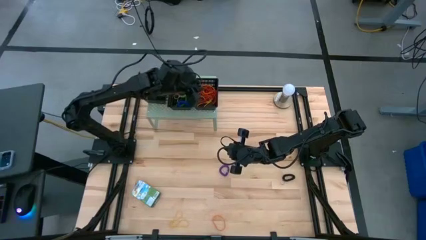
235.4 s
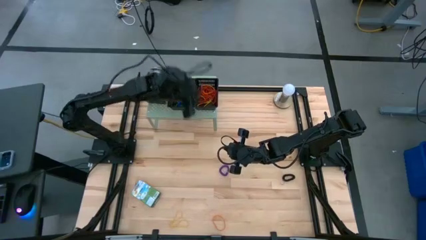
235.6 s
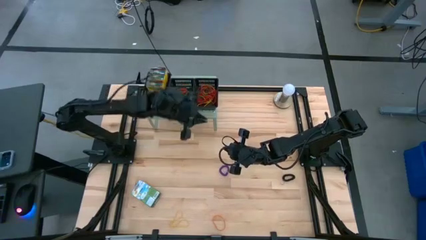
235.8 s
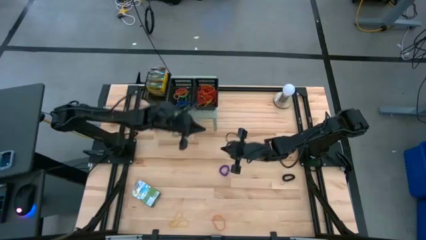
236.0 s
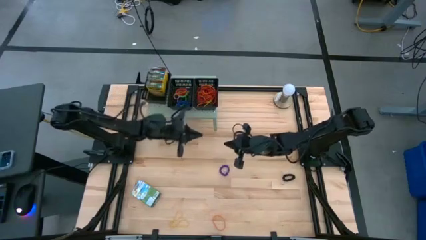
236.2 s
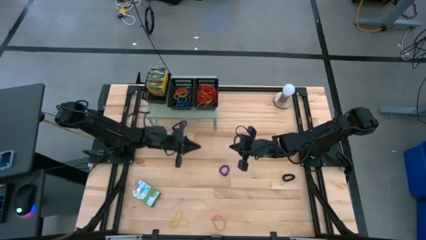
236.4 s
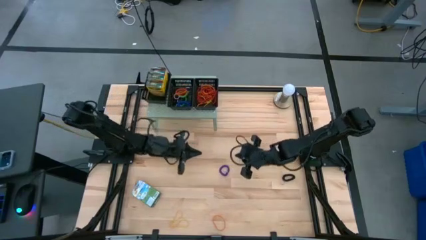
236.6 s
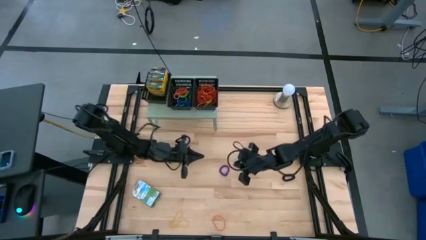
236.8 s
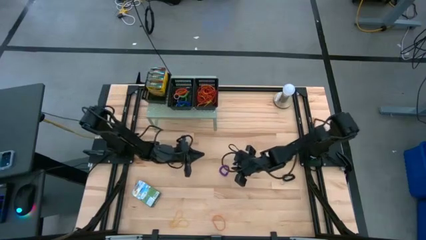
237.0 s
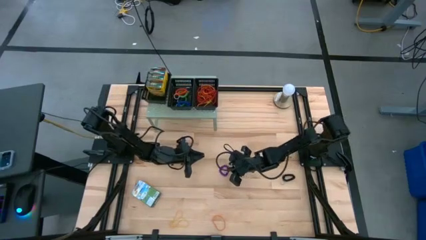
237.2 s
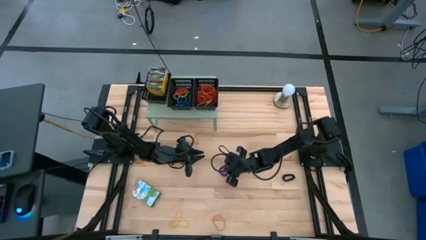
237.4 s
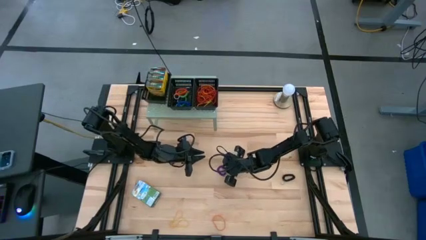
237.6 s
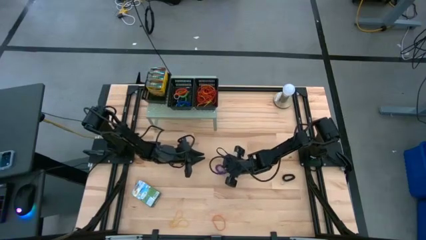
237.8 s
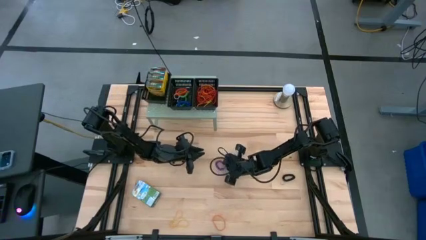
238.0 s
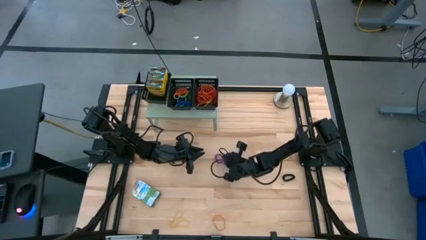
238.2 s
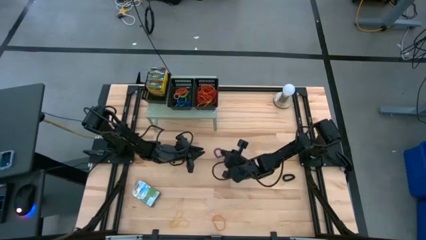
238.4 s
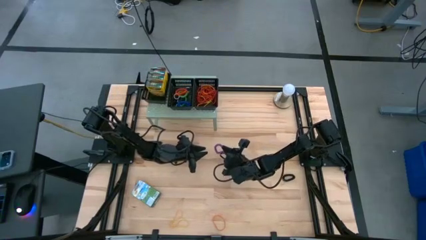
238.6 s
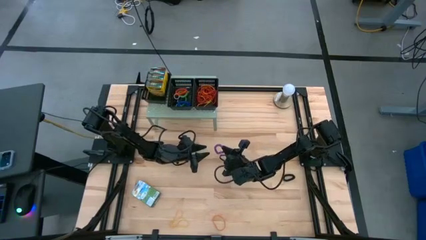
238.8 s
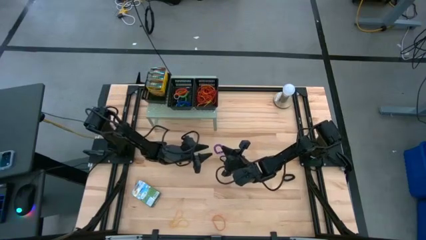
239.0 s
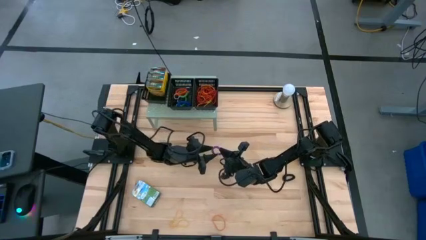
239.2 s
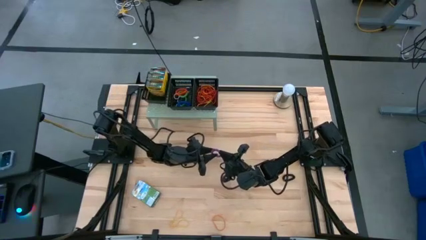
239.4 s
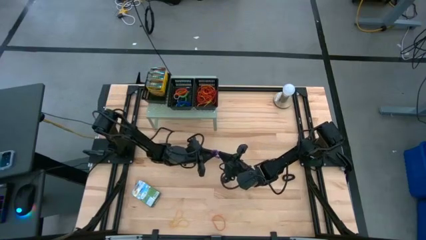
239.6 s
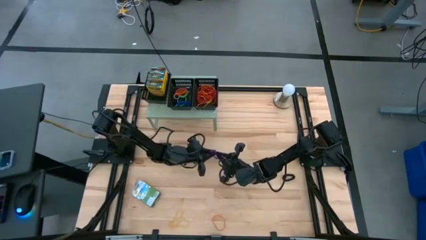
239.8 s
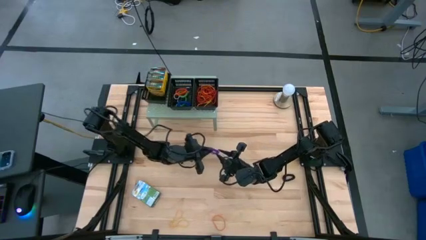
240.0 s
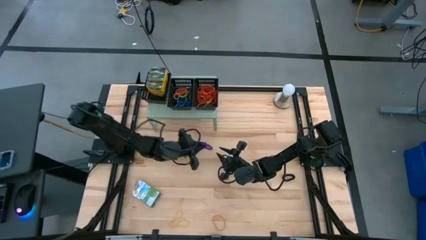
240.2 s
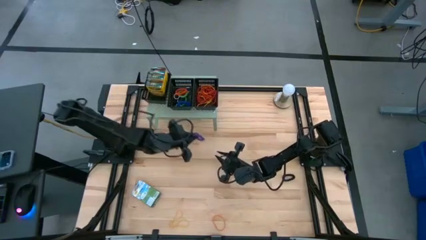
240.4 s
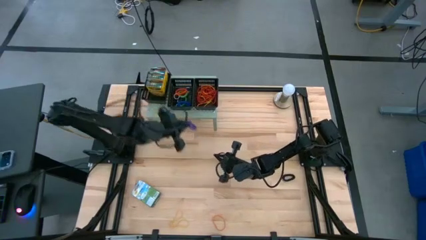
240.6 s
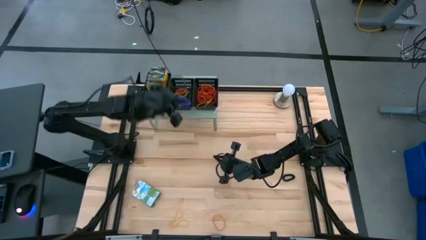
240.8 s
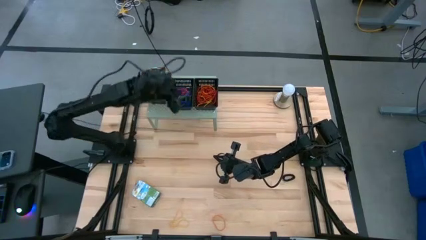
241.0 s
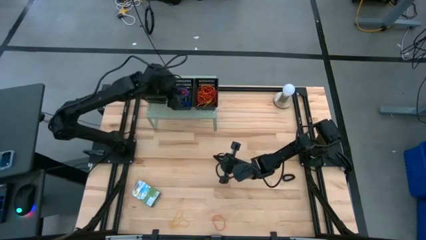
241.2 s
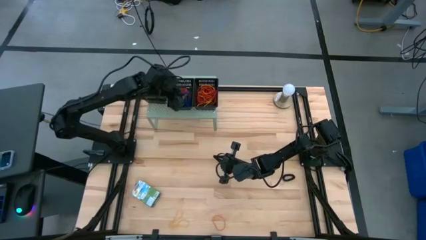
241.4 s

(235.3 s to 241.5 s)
Task: Pick & Place Office Desk Supplies
Put the purple spring keychain into the middle black bin on the shelf

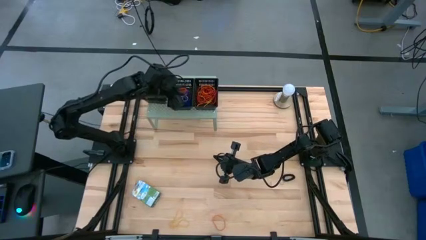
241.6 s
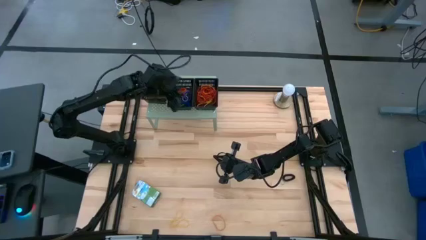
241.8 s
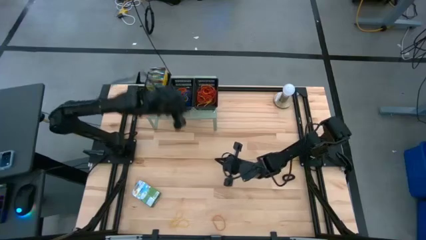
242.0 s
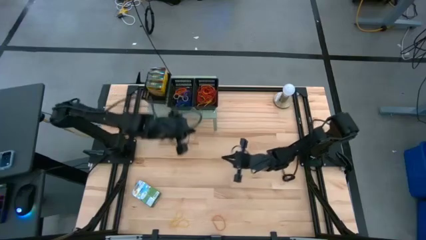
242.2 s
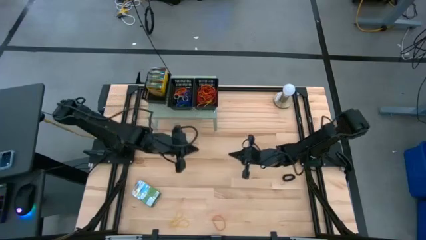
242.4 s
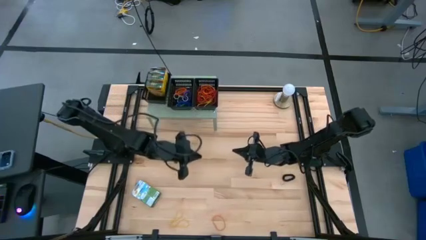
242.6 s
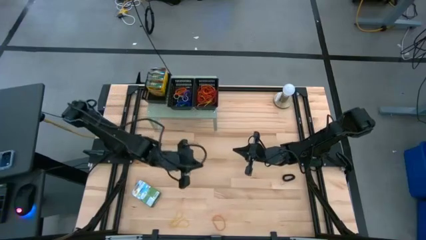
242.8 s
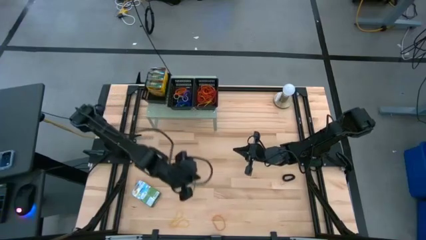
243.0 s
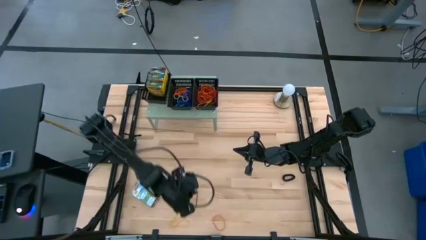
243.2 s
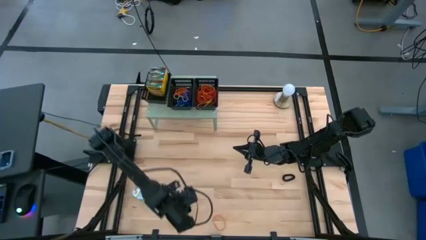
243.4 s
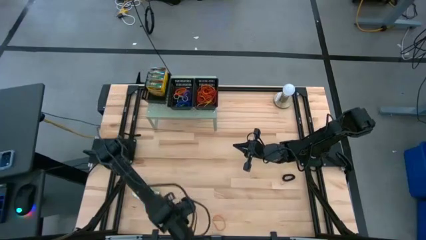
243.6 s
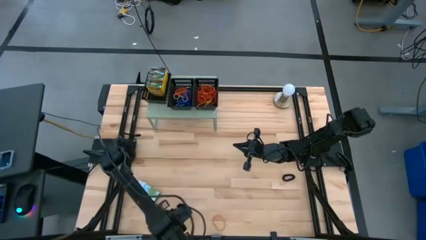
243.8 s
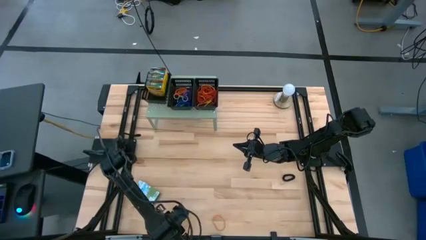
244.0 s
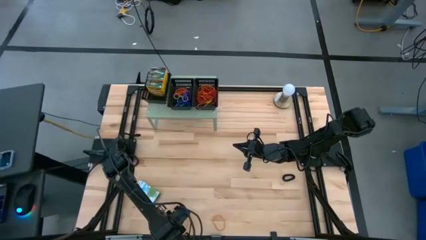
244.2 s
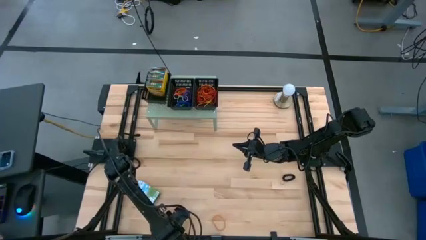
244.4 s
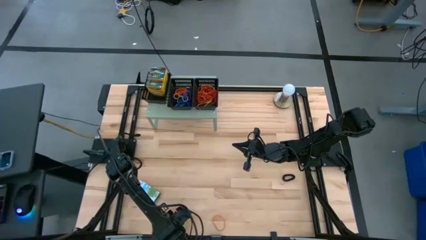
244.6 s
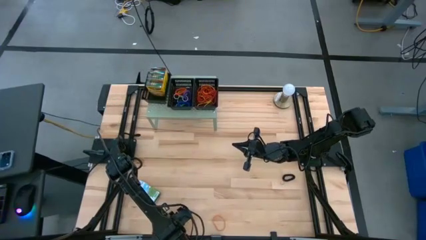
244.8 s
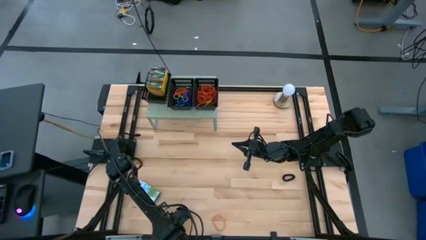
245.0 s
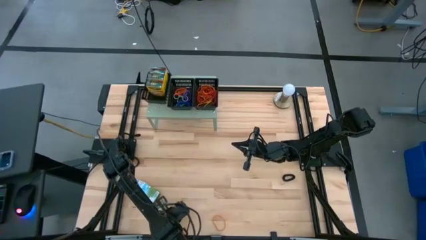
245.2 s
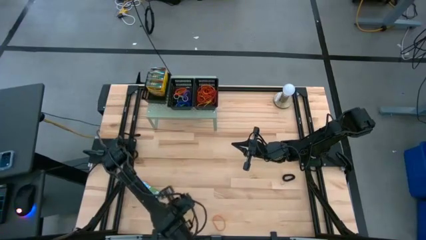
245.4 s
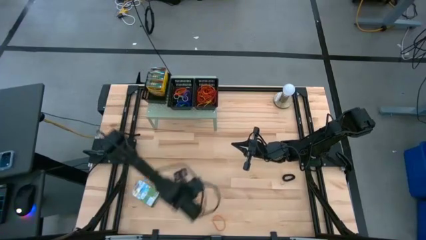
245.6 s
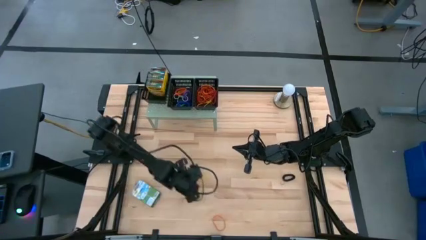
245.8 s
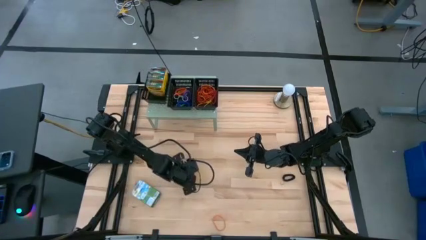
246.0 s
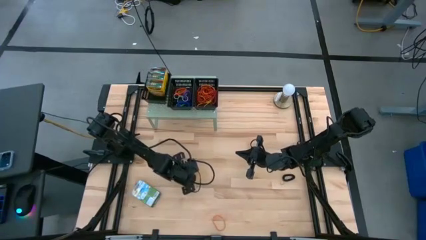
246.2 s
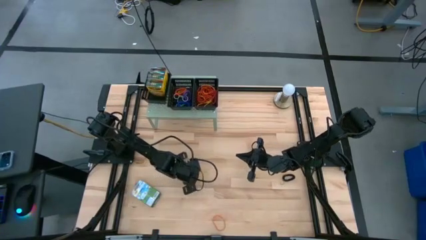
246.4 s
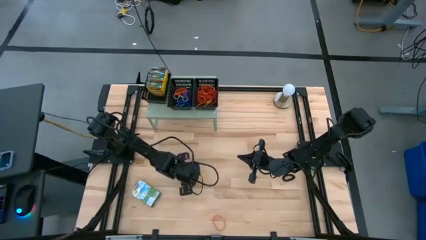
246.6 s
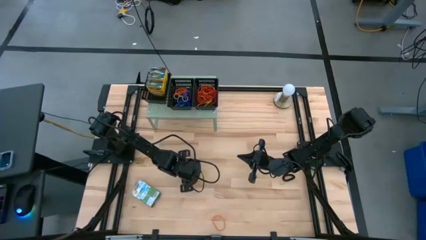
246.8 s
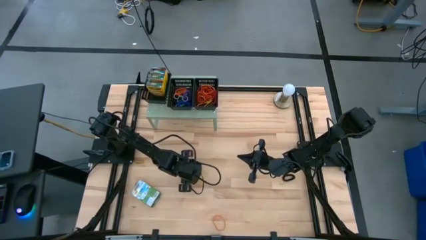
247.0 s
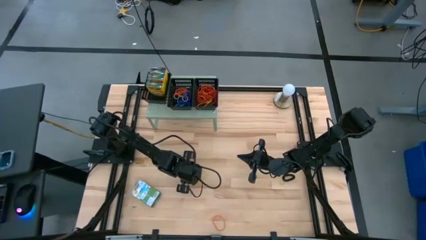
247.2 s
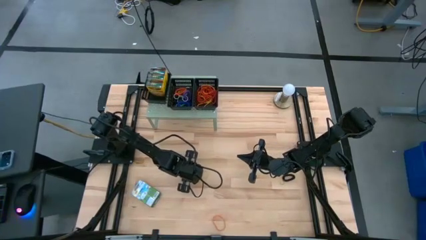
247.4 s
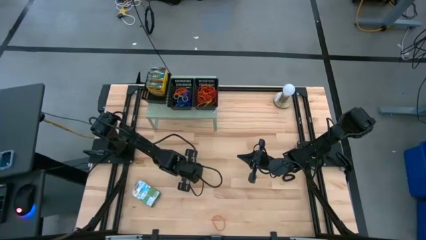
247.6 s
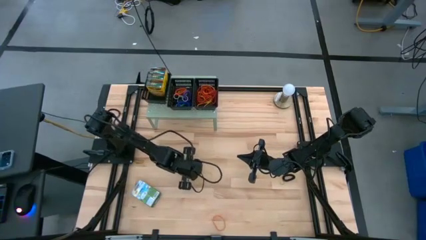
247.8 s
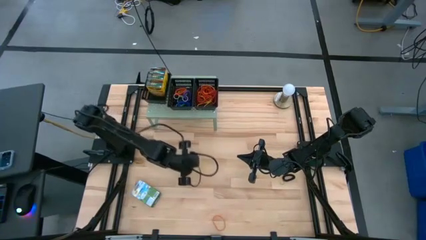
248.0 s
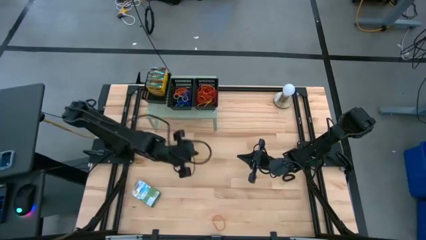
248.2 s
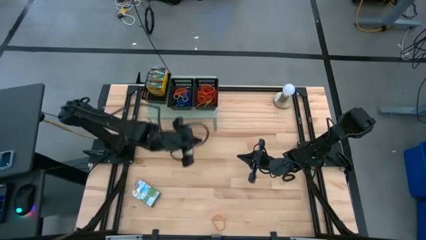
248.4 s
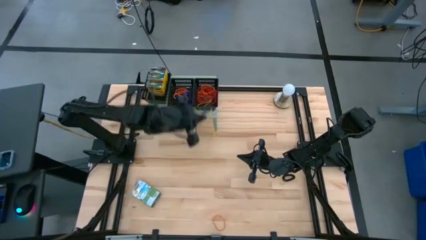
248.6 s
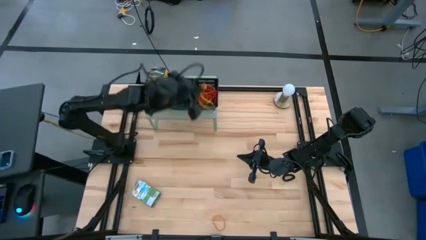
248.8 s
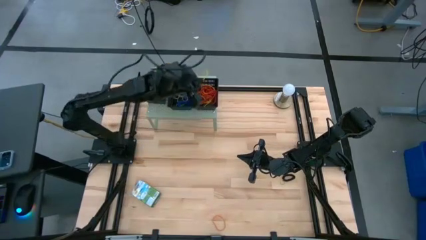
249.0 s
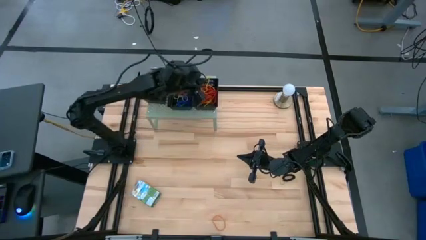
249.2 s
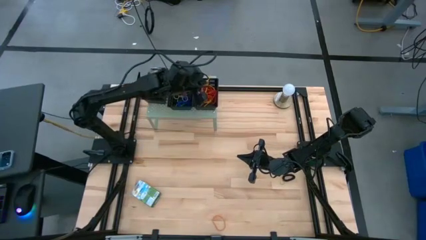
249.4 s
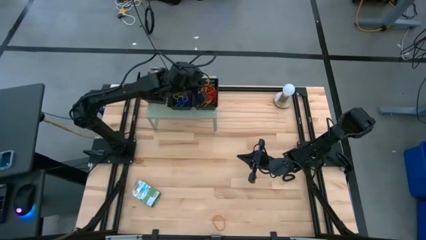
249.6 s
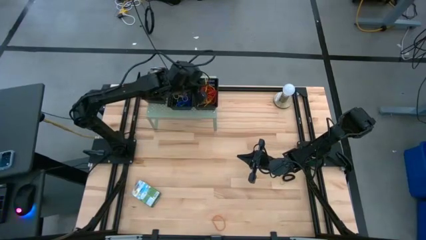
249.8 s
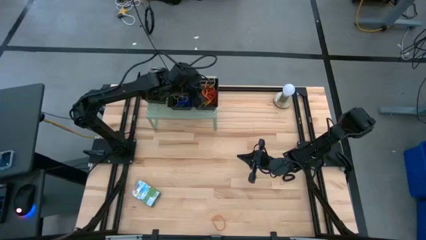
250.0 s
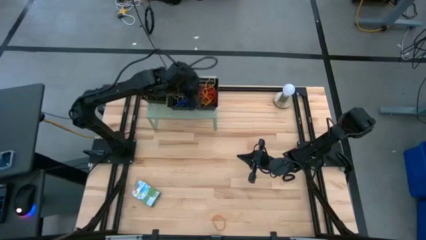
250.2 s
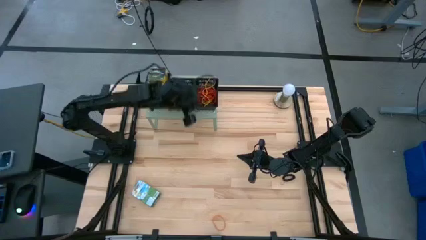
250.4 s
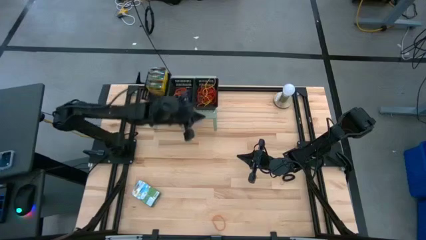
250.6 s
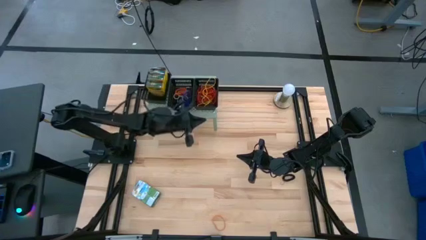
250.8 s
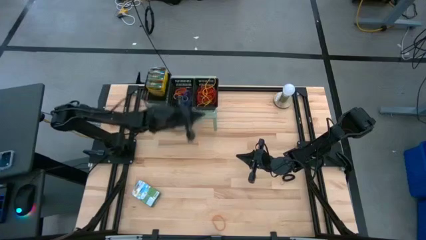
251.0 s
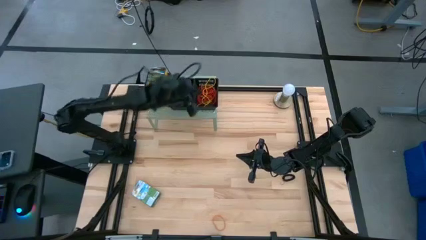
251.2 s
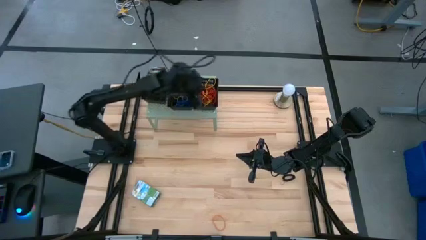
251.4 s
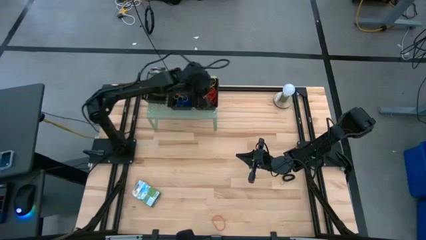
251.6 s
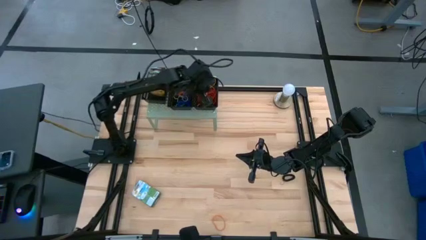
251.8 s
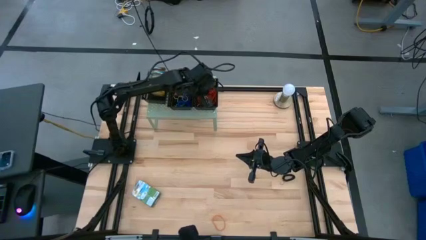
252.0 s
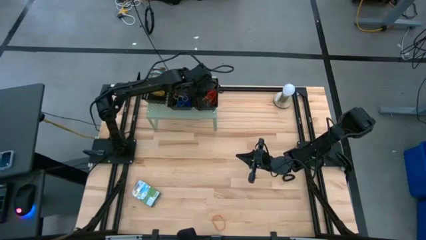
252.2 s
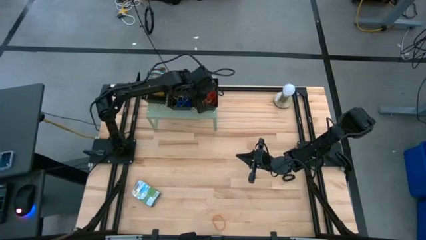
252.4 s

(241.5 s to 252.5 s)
Put the yellow rubber band into the right black bin on the shelf
